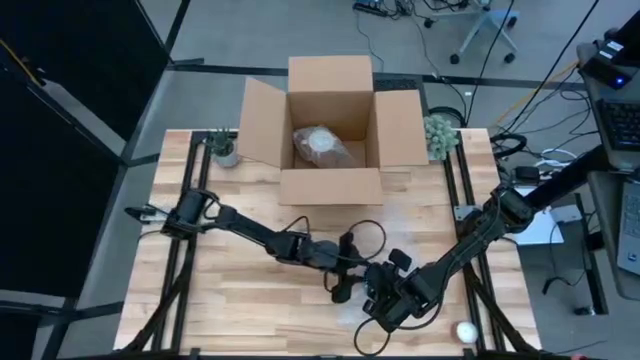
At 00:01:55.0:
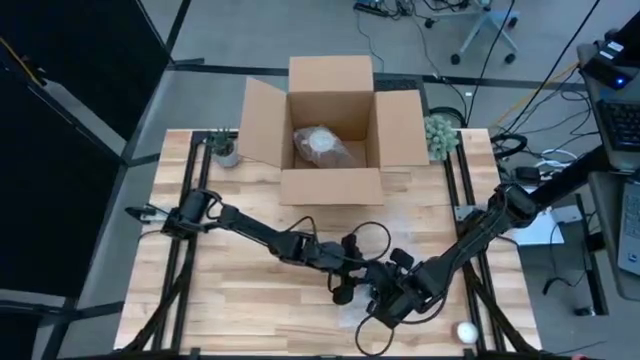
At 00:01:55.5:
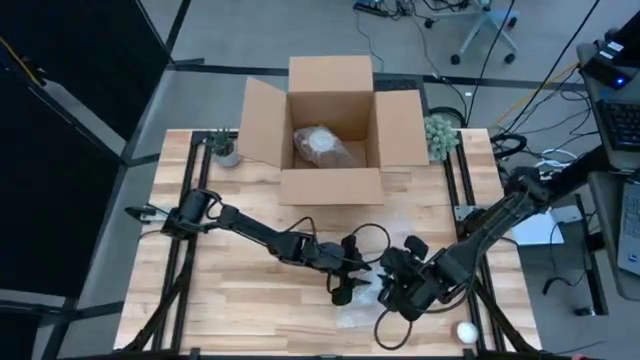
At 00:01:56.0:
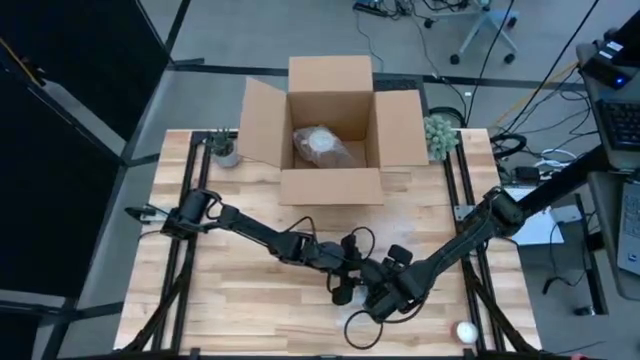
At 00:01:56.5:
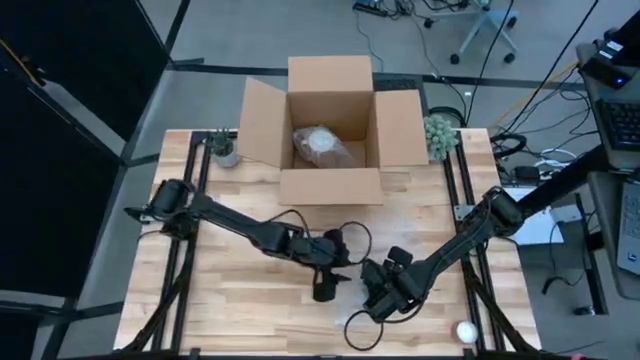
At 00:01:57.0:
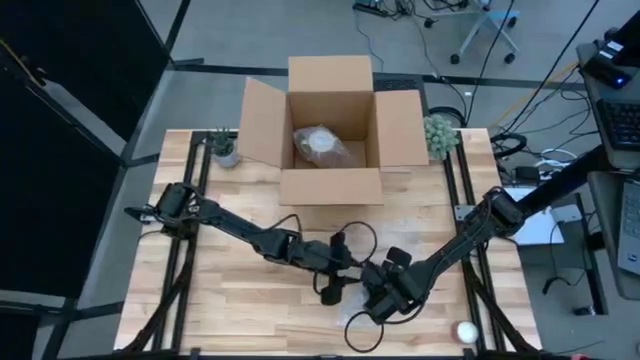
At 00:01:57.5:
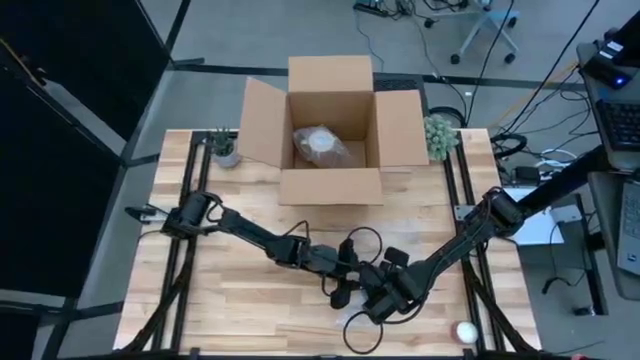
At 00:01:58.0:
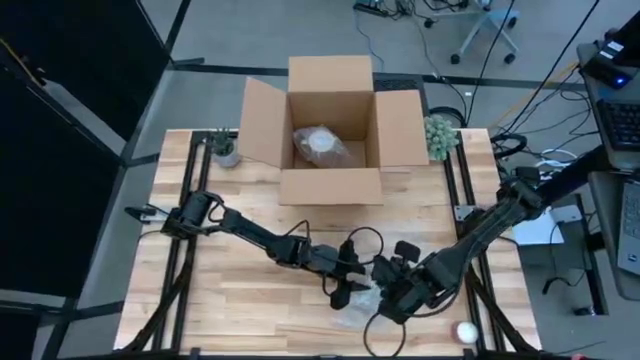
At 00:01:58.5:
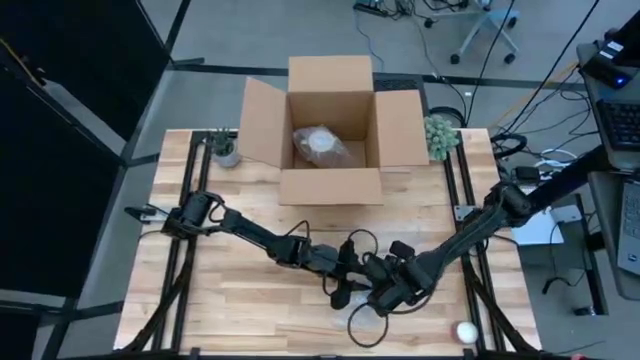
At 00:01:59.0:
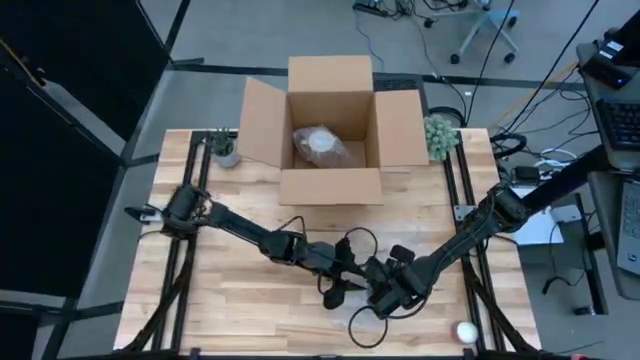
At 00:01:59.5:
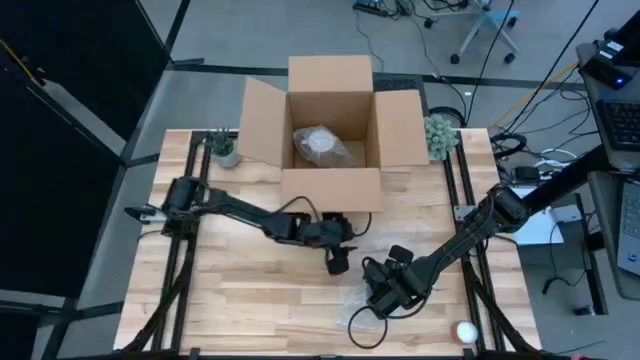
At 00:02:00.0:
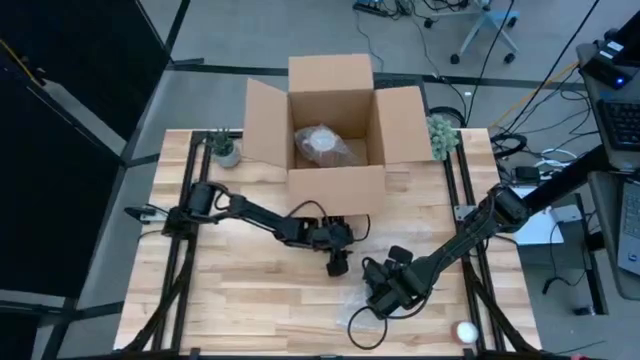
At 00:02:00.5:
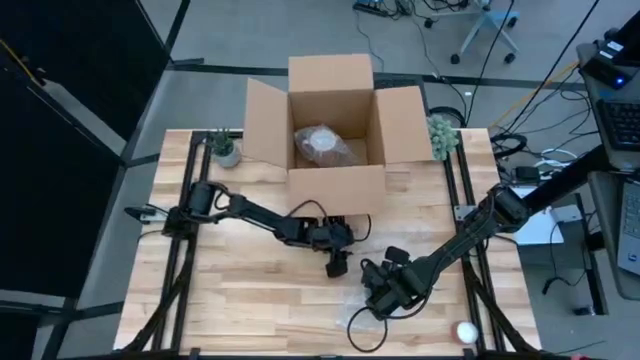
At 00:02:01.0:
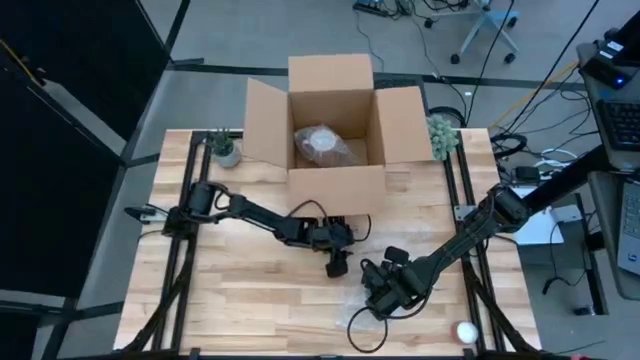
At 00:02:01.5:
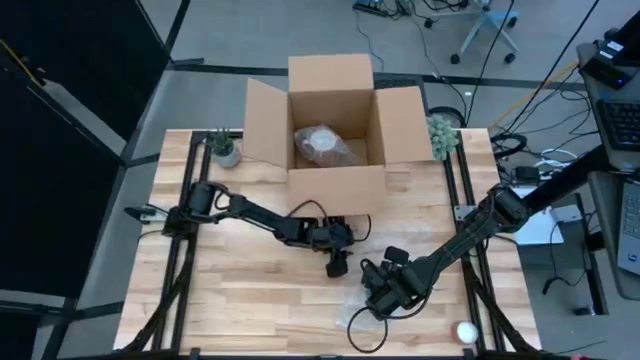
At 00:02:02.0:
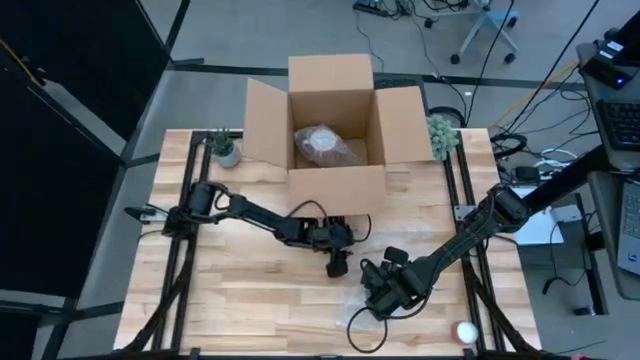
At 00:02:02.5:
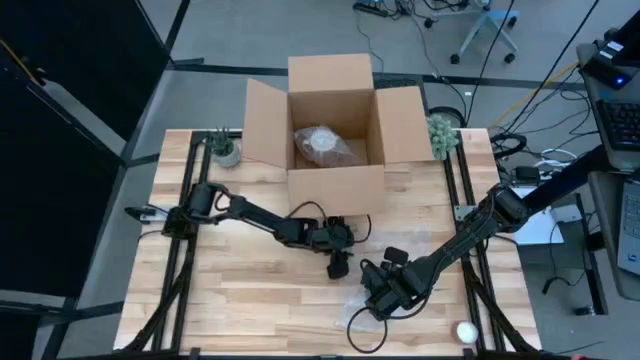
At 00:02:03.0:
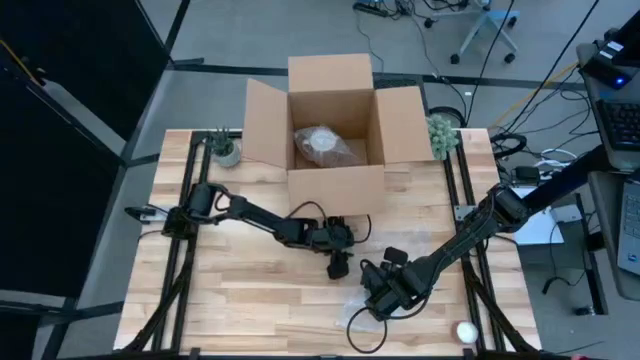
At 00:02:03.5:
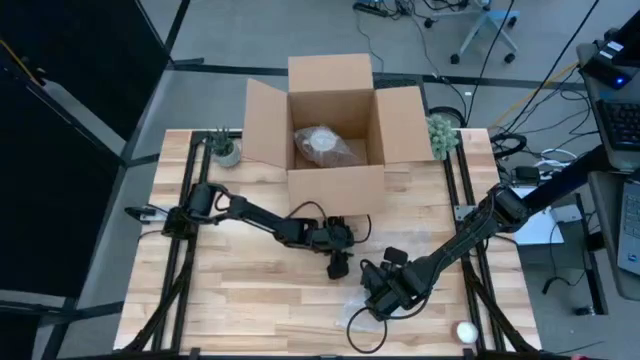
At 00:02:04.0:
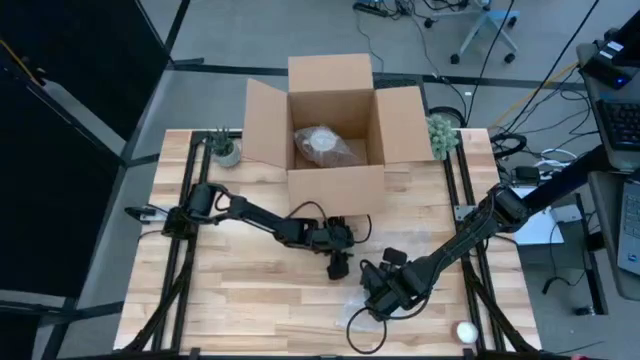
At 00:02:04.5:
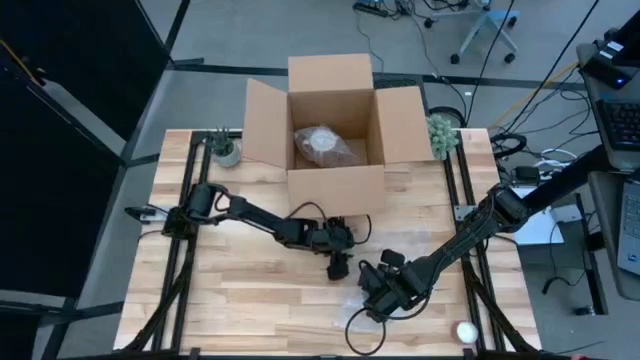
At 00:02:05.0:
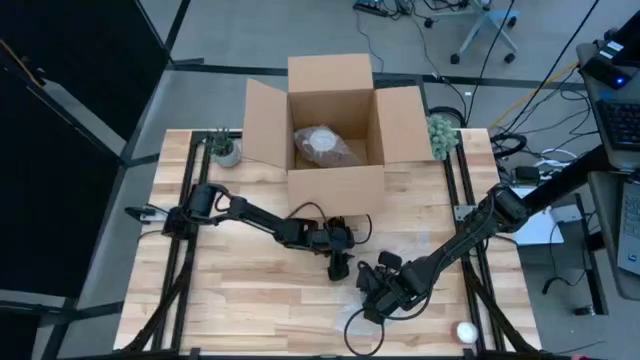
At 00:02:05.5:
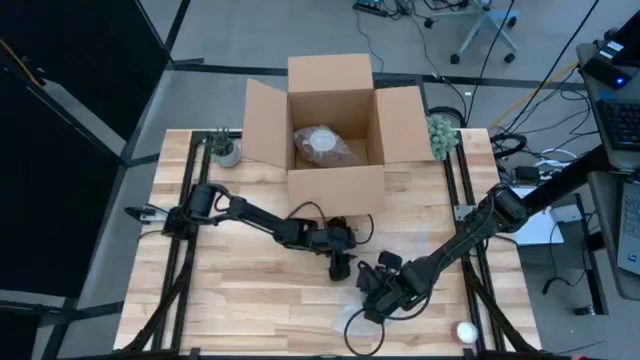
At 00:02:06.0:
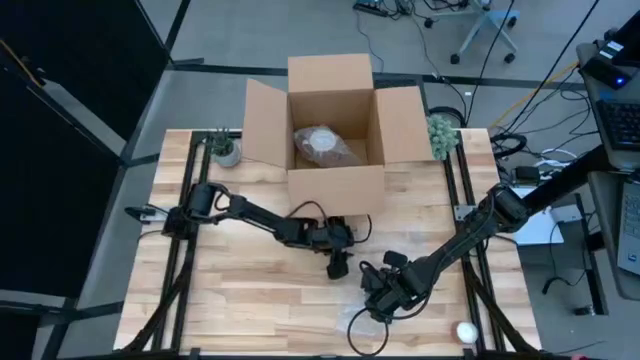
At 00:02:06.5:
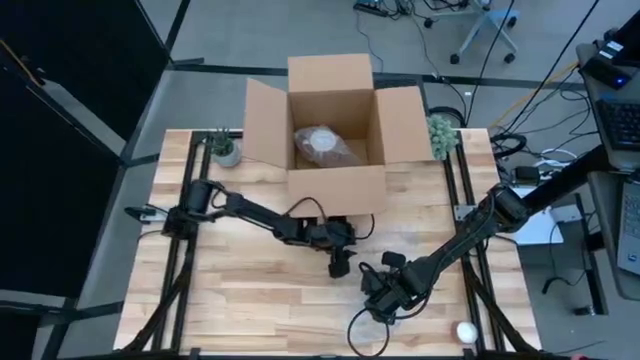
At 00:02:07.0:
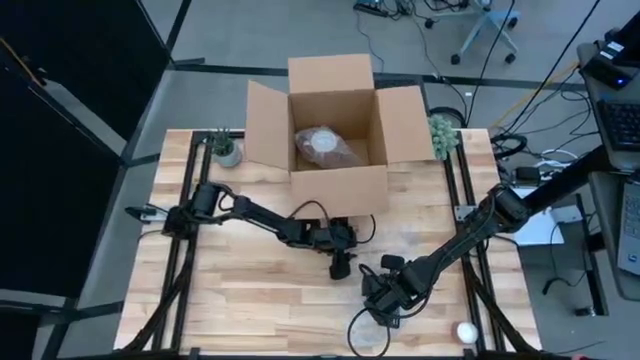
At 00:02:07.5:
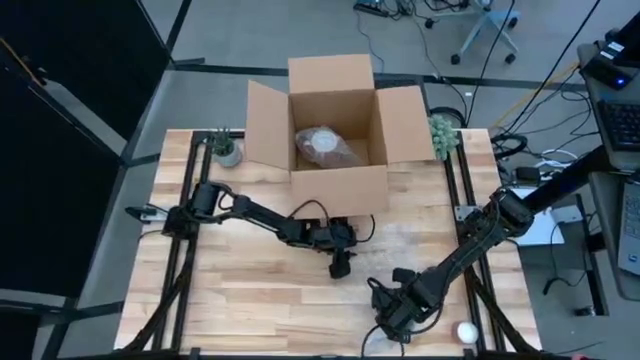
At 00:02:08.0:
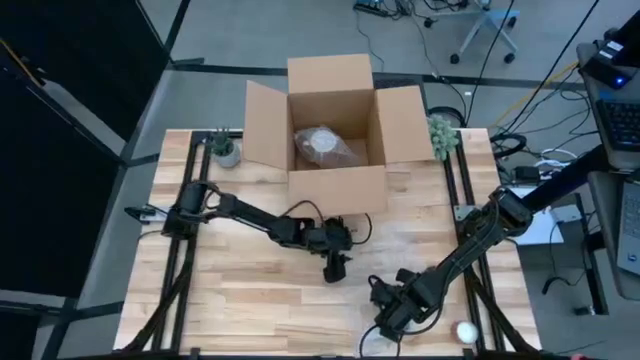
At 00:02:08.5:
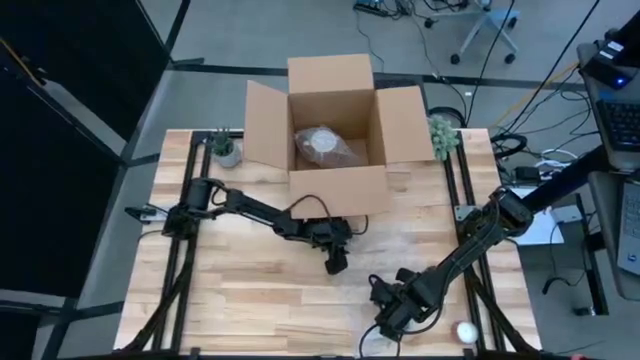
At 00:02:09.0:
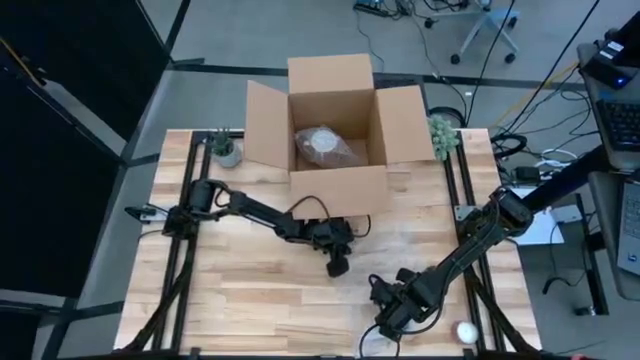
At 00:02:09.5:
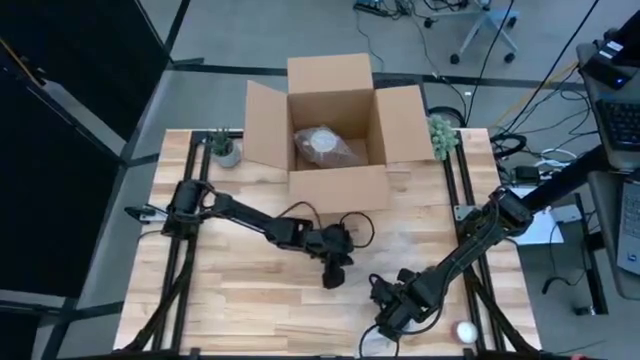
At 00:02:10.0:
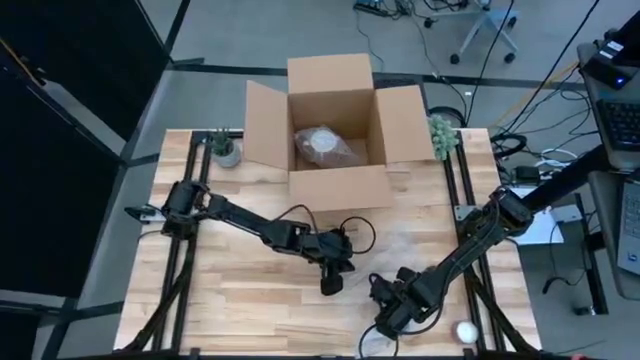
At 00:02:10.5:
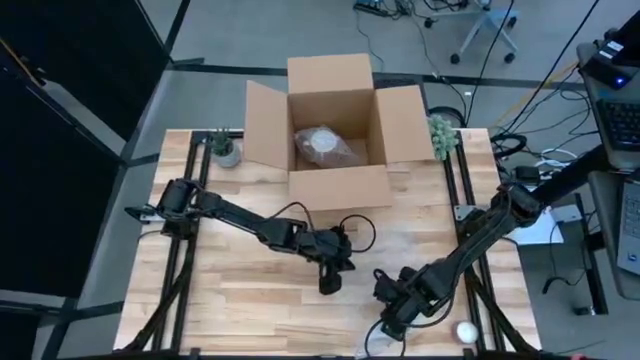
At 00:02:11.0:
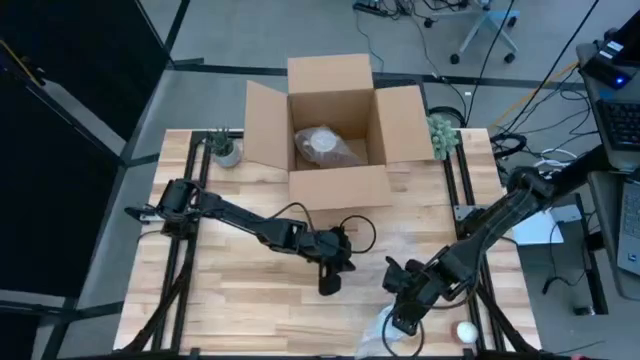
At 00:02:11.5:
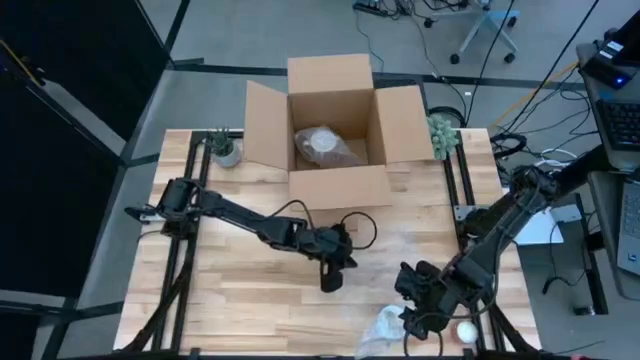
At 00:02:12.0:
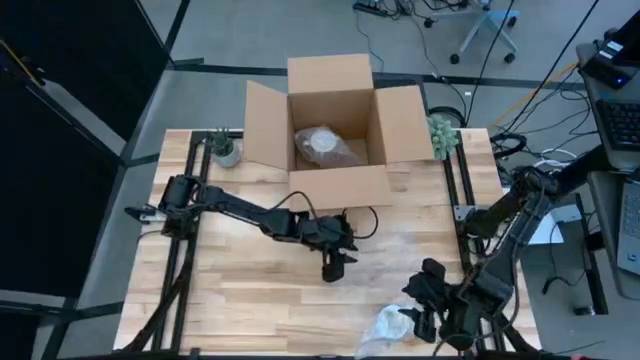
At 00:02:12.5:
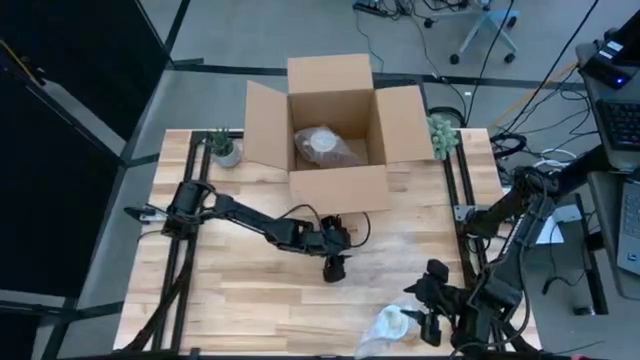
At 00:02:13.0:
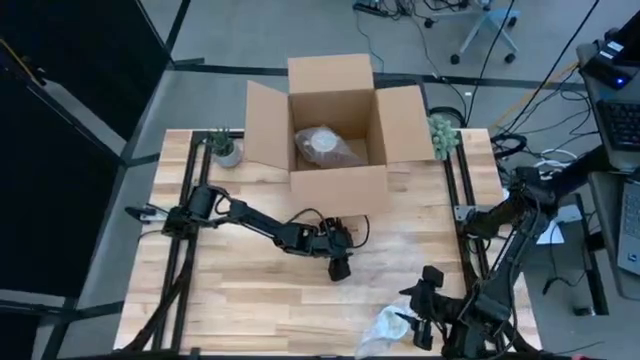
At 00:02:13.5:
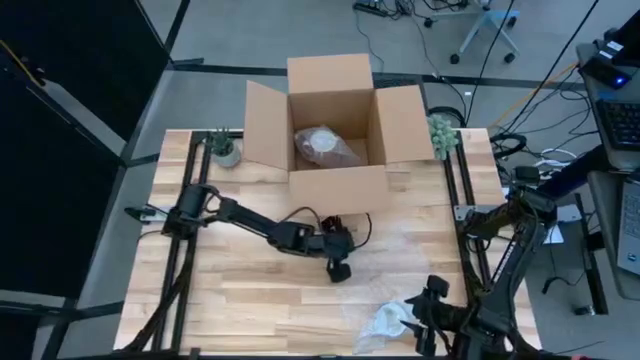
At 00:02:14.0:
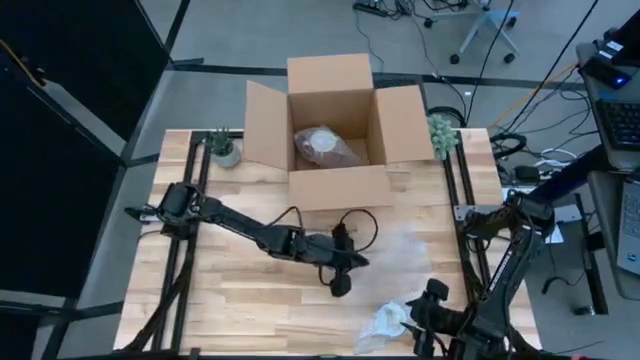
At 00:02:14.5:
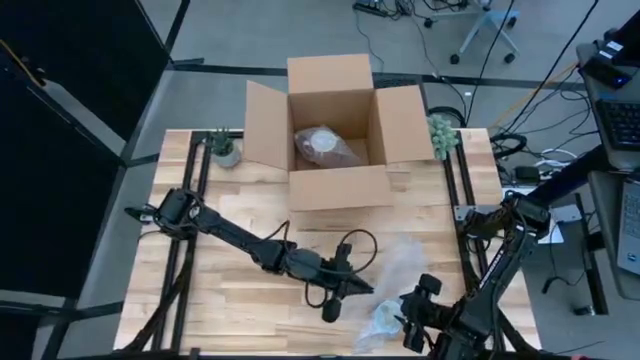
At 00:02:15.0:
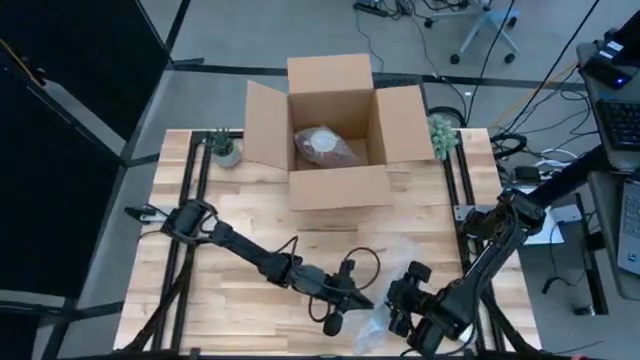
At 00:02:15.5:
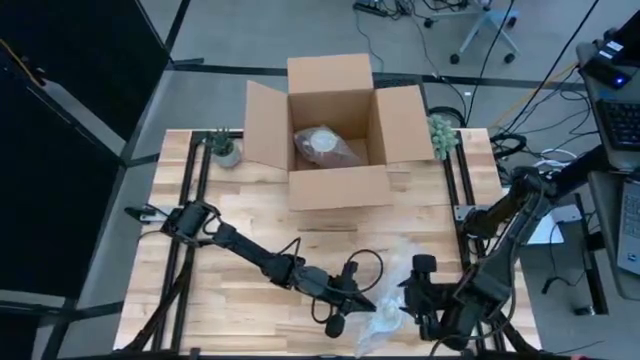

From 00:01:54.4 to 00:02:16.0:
Task: wrap mug
Wrap the red mug with the bubble wrap
